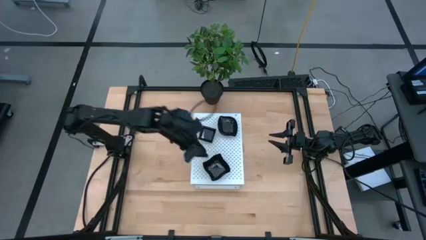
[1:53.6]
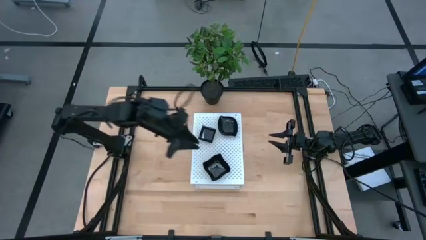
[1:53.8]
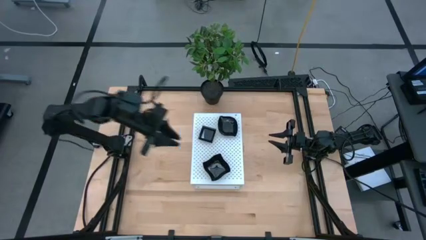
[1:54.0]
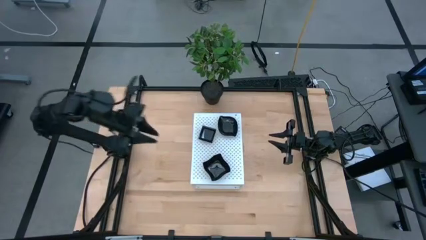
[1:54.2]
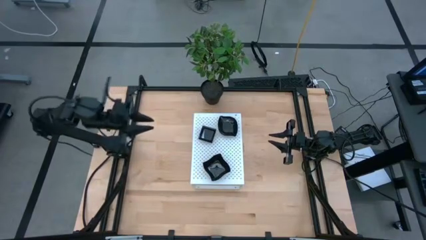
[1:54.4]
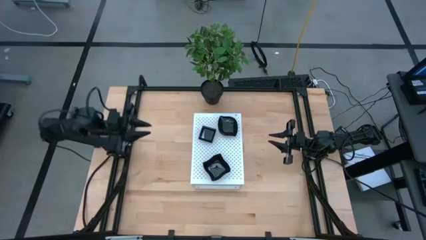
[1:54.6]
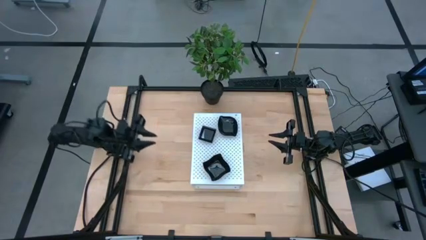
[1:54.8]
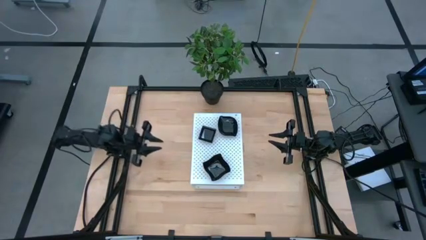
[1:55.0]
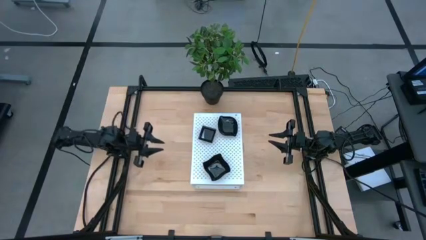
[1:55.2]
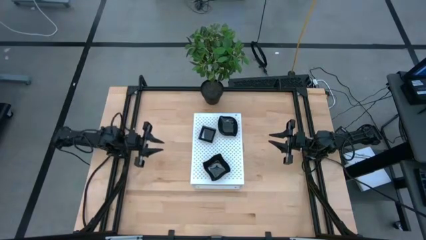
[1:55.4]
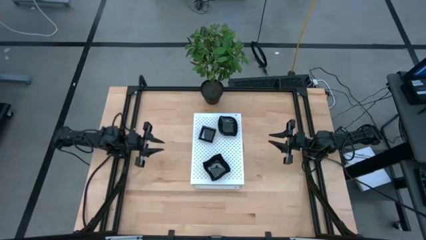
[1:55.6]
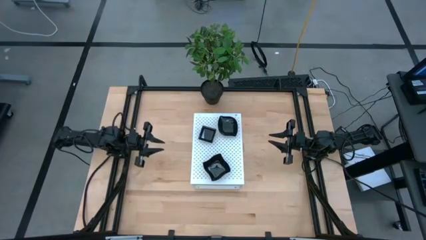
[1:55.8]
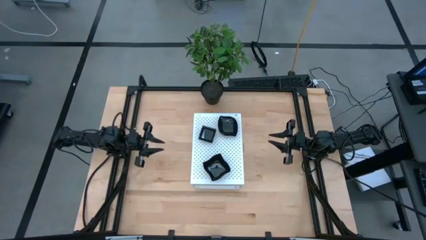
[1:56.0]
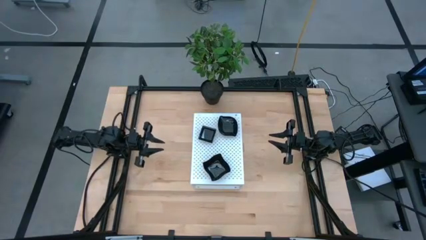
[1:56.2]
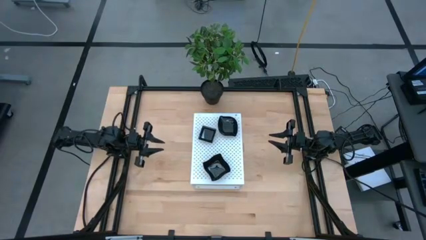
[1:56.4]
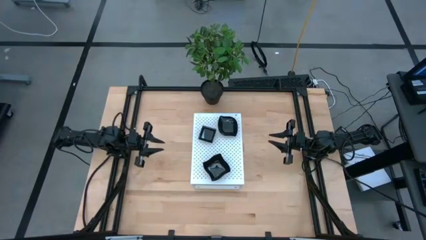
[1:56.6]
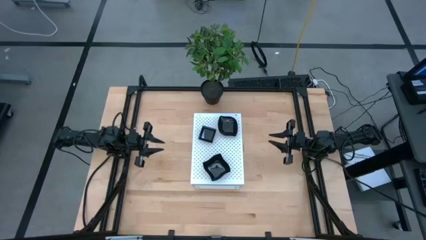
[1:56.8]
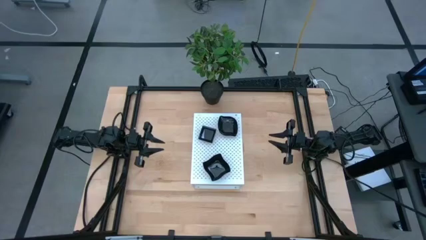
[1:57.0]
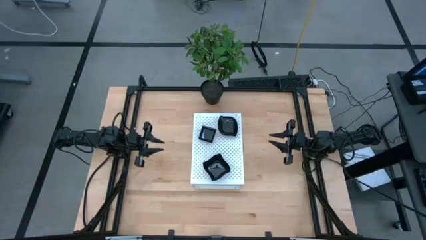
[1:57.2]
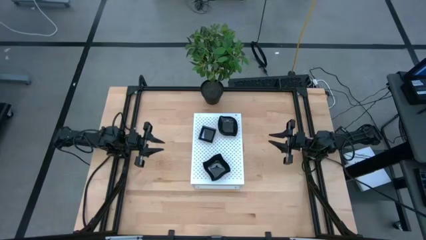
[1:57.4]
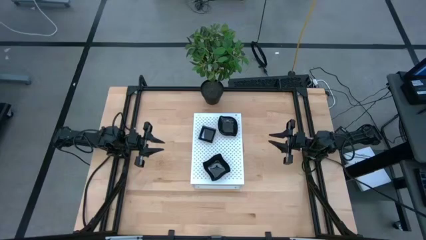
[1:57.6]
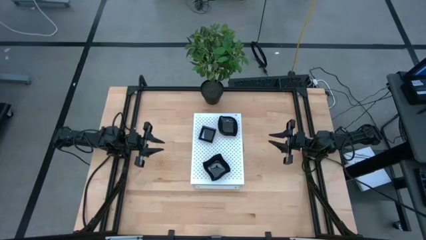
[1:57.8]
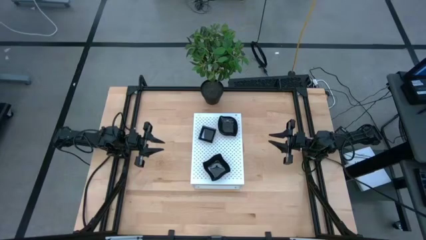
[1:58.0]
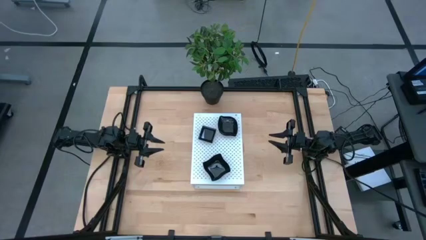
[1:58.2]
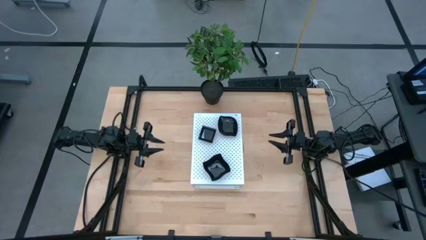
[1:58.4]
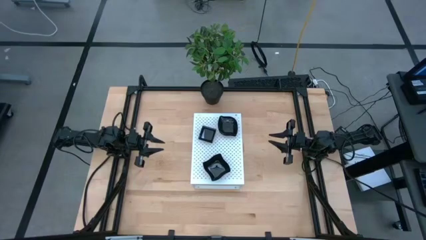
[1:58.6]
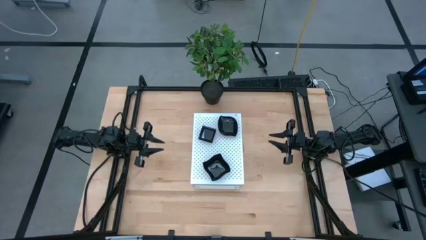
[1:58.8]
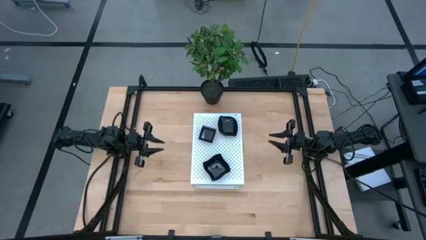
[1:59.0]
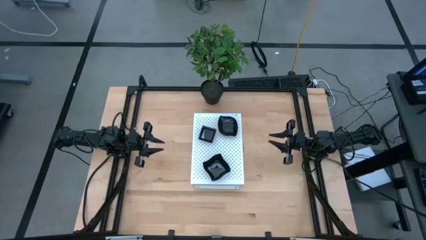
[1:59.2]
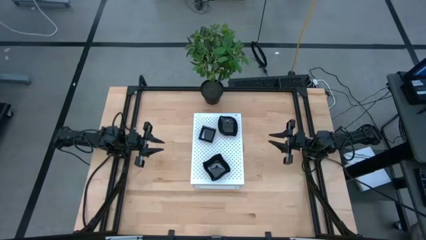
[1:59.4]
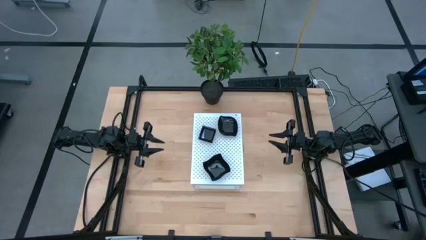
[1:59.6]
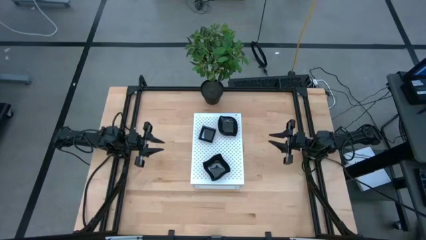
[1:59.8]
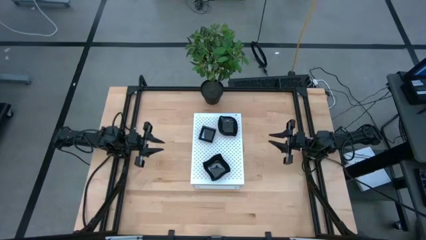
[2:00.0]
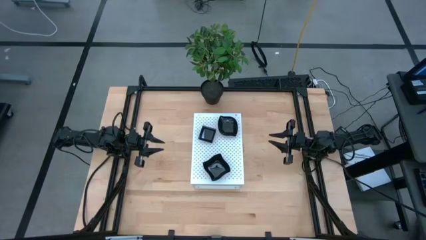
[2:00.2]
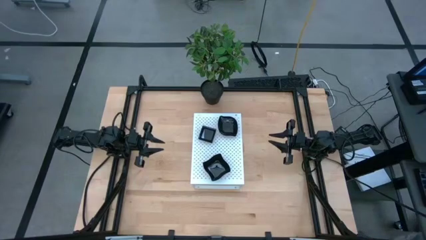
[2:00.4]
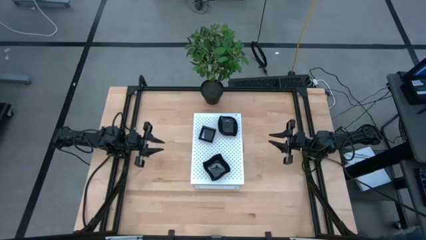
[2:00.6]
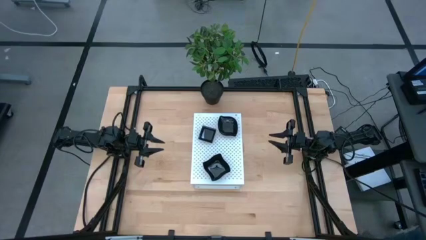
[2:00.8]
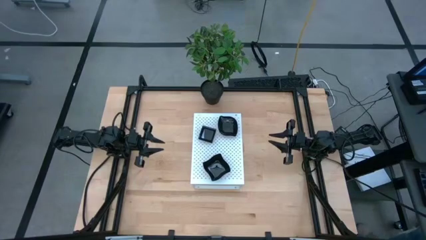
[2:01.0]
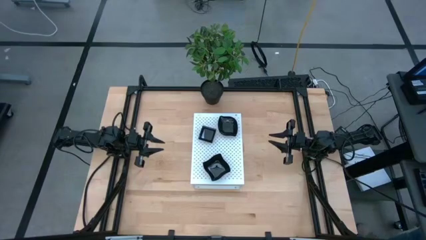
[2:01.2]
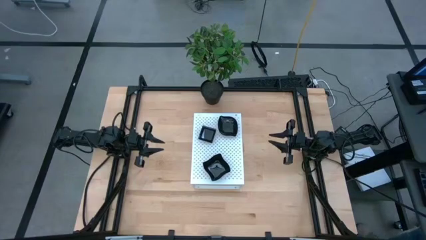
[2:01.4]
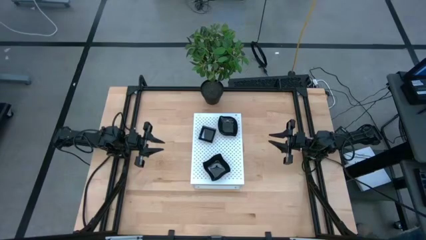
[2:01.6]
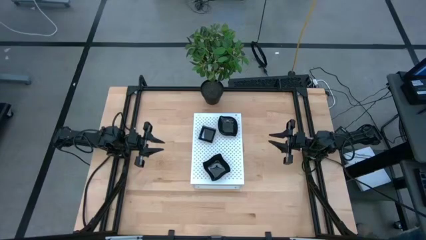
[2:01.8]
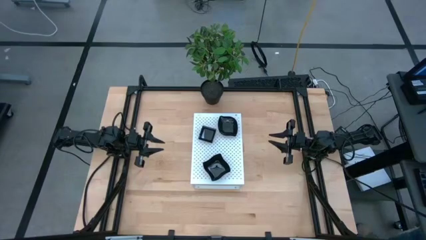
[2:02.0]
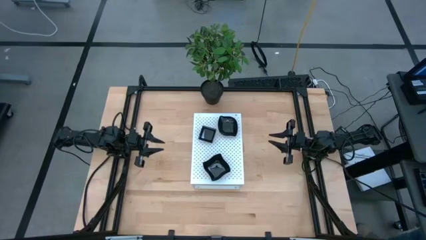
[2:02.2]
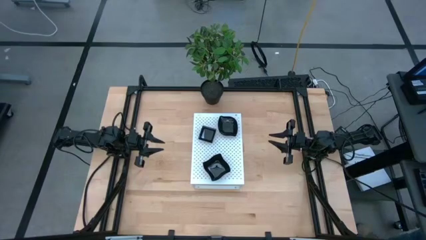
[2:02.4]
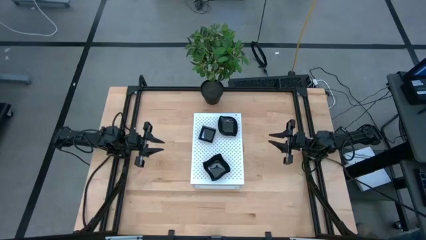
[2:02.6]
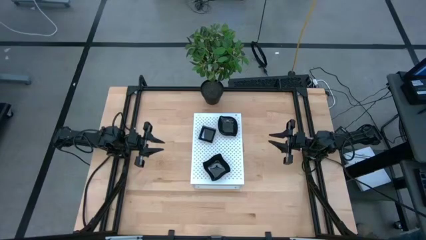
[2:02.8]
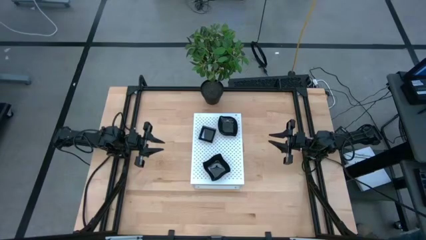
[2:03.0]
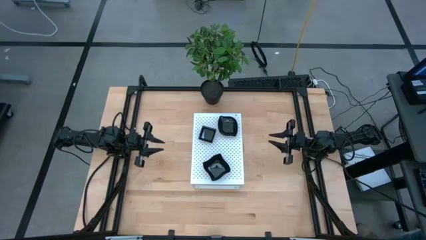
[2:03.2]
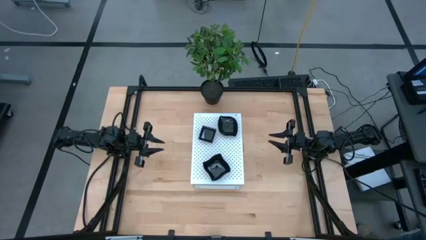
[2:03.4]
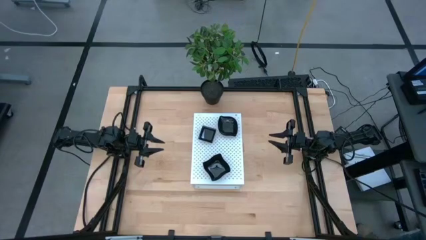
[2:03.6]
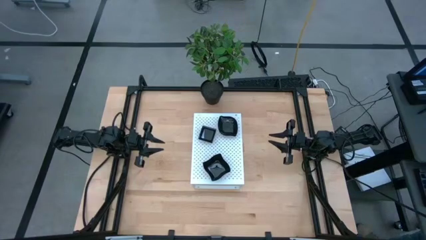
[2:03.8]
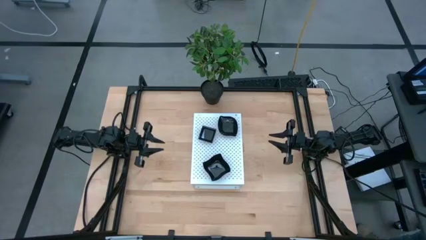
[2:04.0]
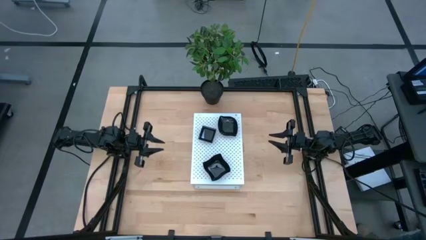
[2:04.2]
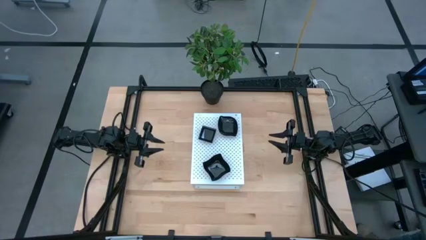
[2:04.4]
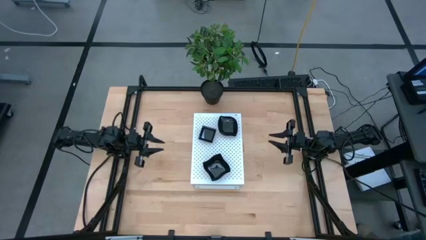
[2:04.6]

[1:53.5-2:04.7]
Task: Pick & Place Mini shaped plates
Return to Home Position
